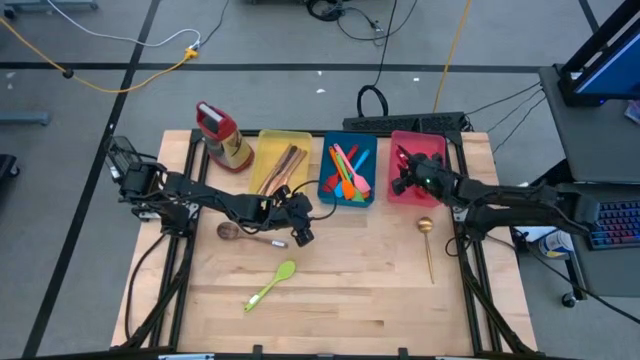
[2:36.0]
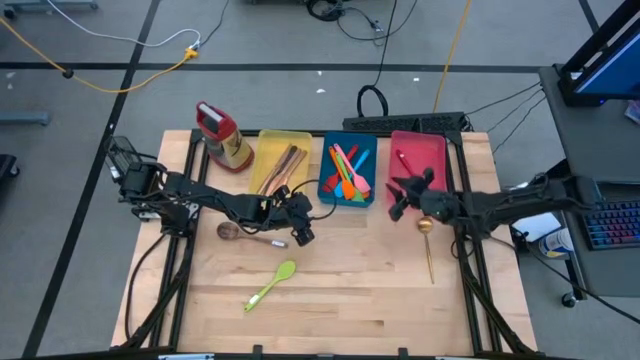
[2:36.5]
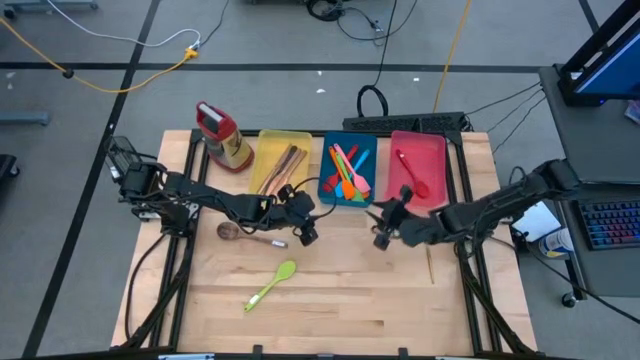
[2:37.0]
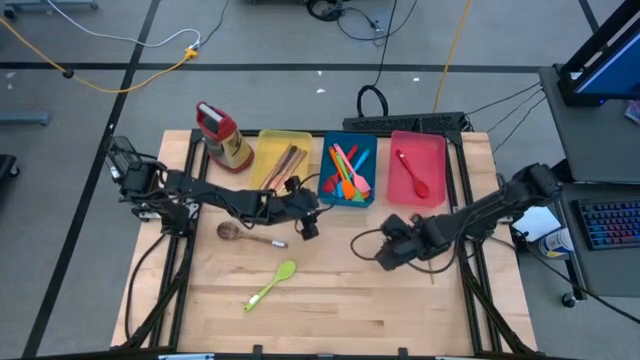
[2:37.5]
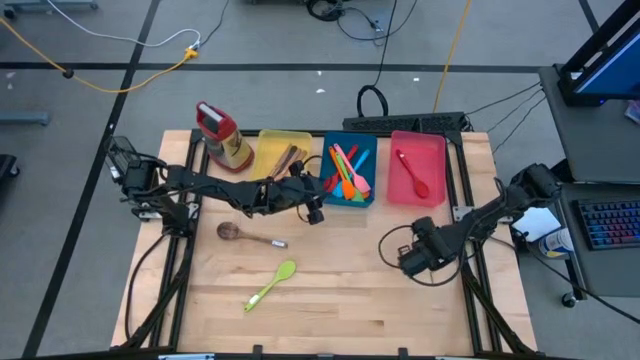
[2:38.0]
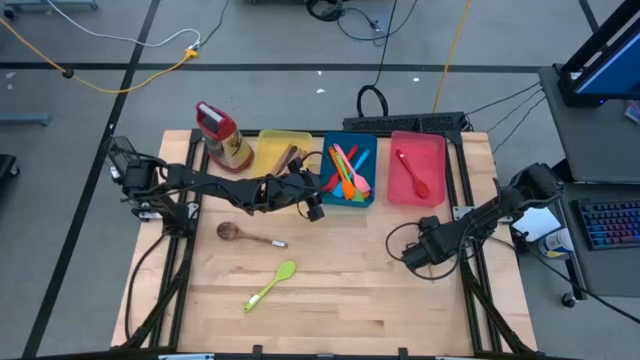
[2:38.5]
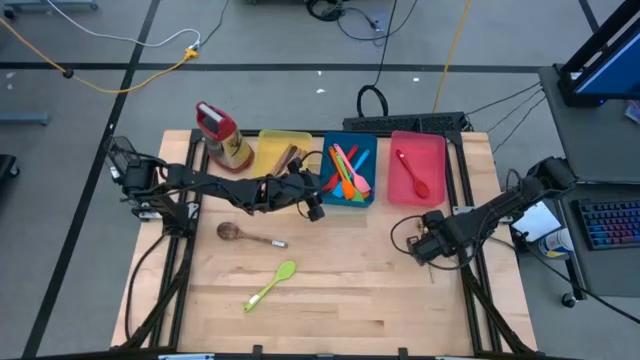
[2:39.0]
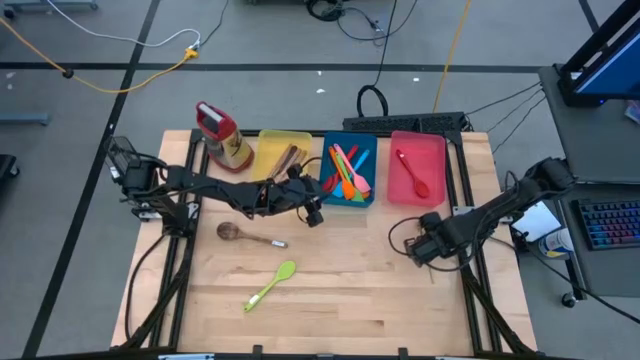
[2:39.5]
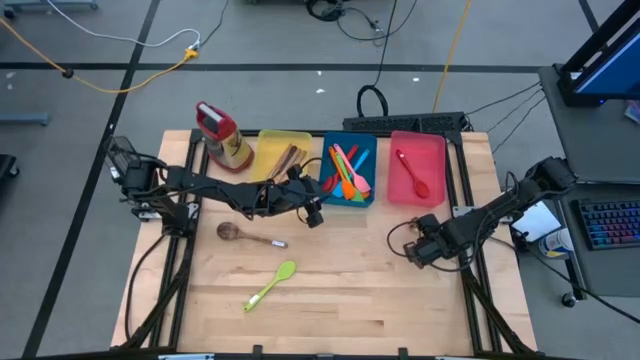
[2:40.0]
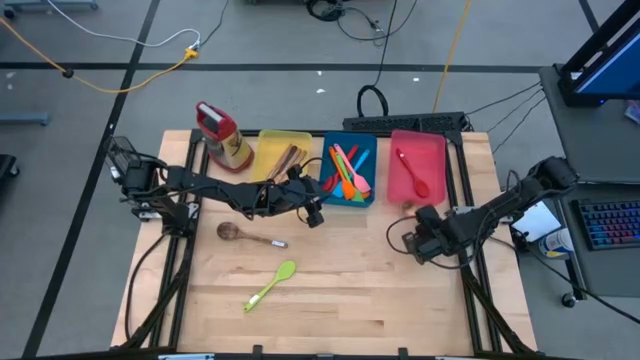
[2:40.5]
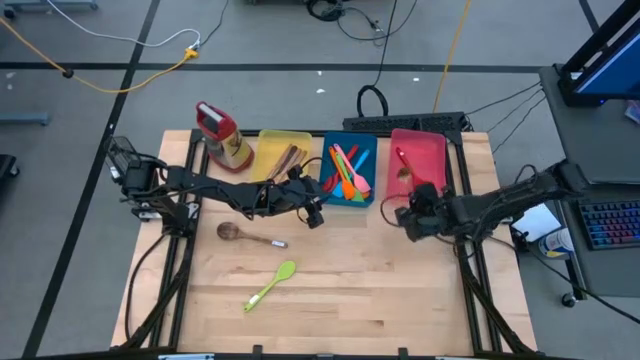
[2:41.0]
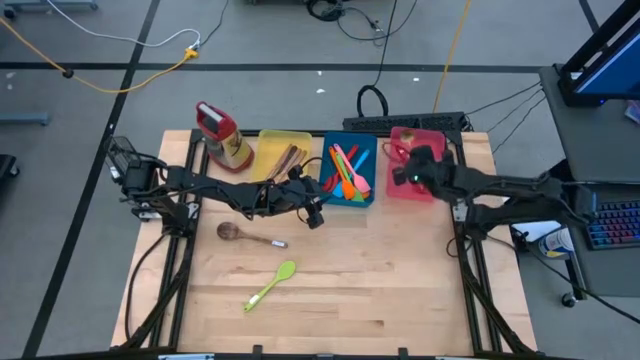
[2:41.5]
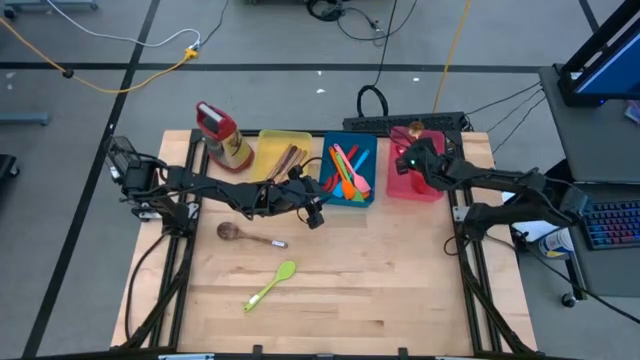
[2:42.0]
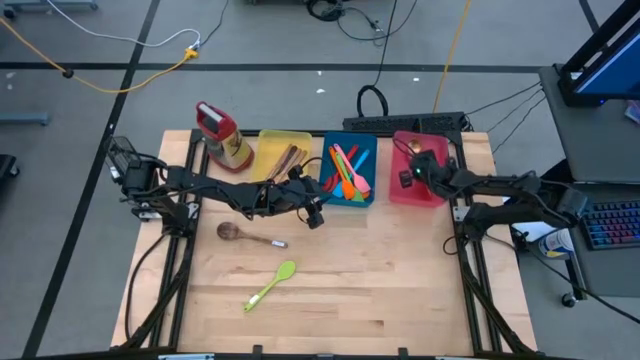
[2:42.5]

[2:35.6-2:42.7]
Task: Pick & Place Kitchen Items
Put the gold serving spoon into the pink bin

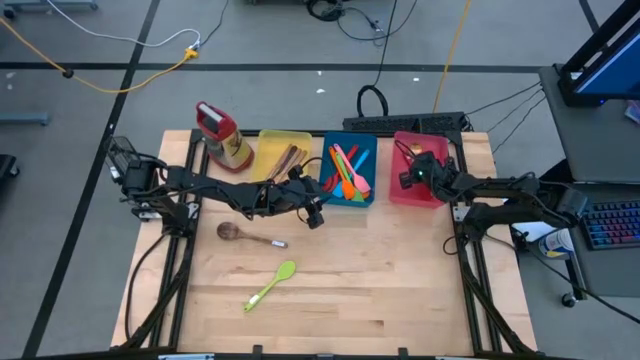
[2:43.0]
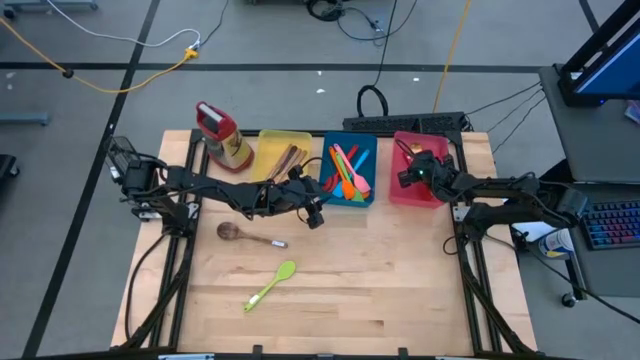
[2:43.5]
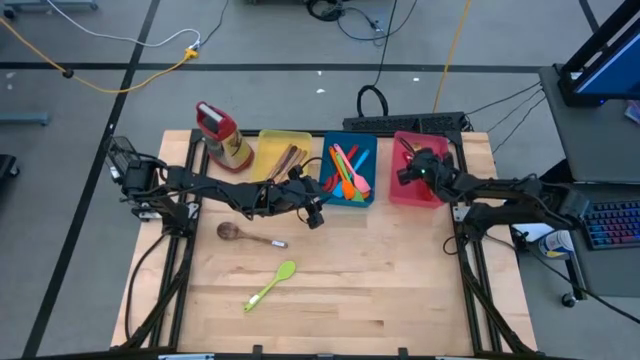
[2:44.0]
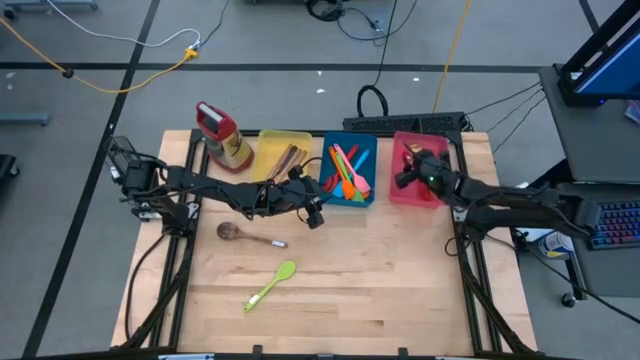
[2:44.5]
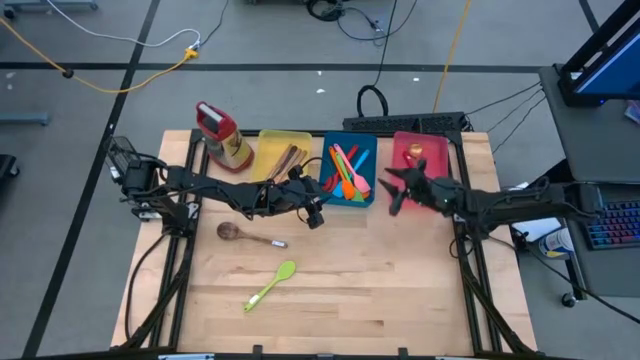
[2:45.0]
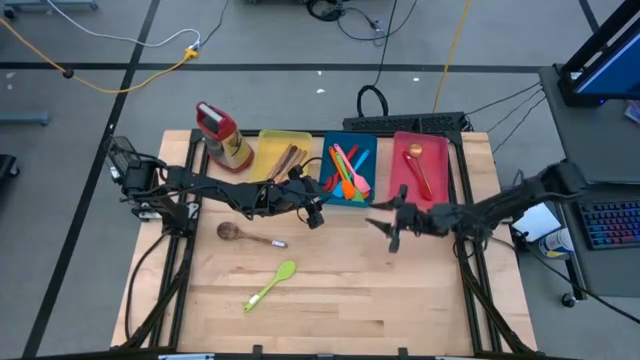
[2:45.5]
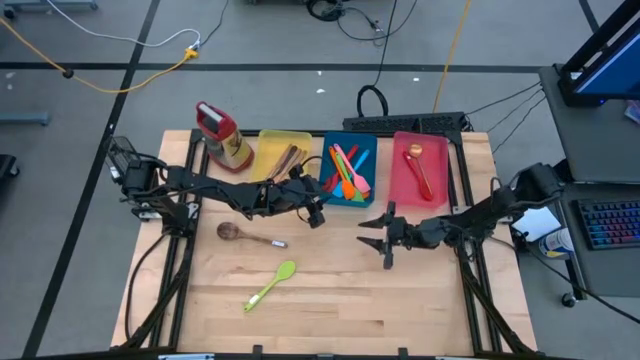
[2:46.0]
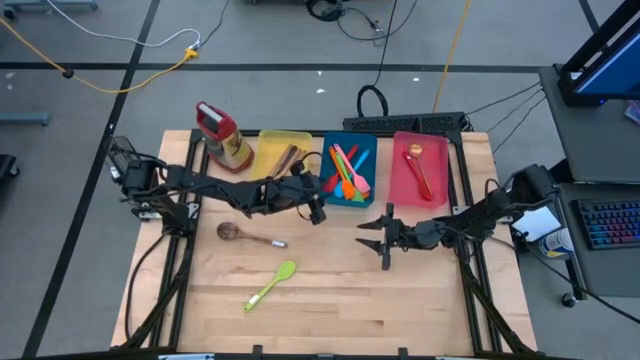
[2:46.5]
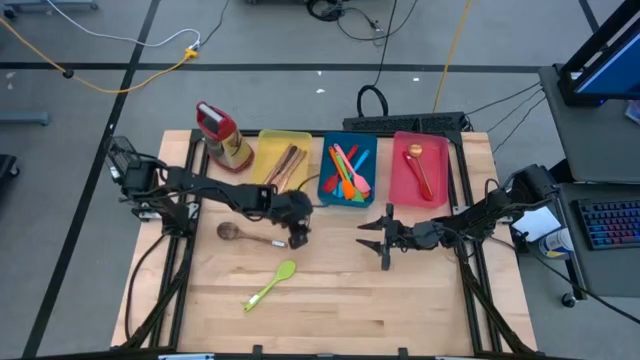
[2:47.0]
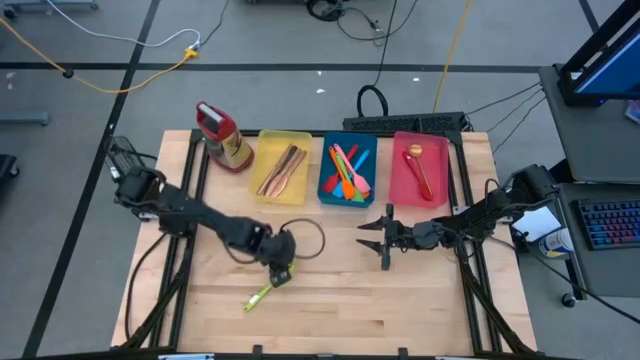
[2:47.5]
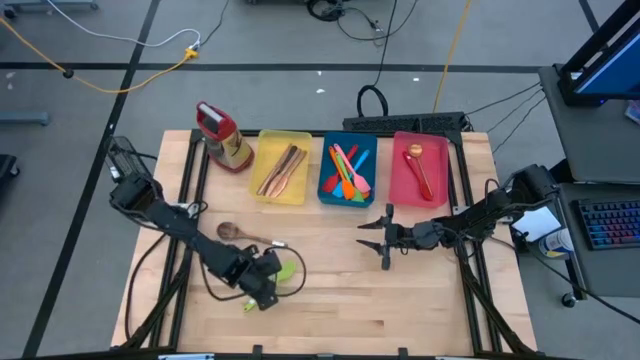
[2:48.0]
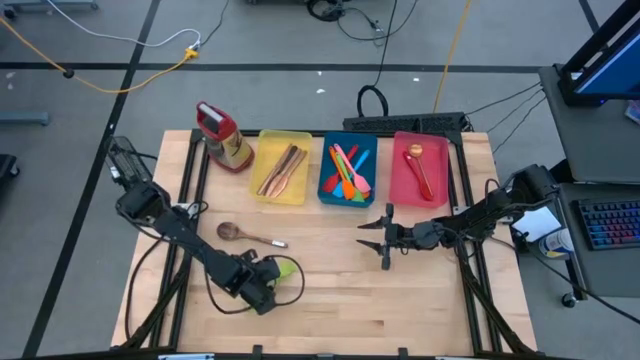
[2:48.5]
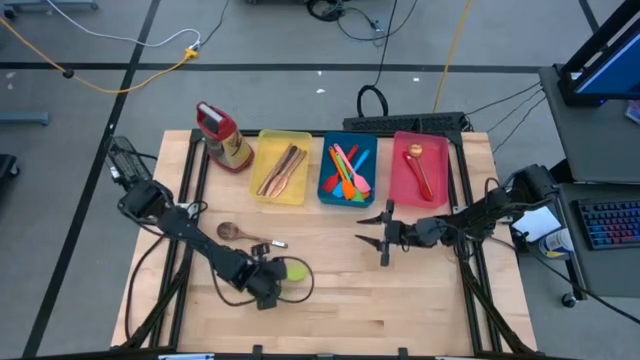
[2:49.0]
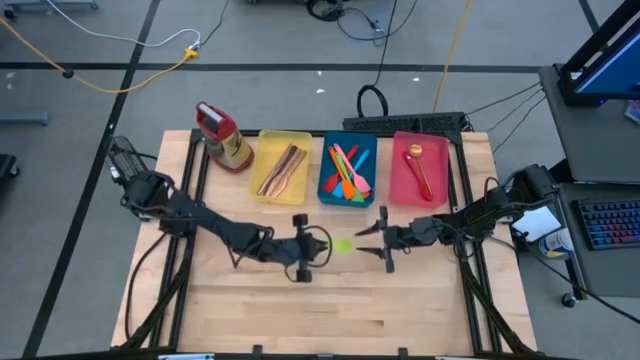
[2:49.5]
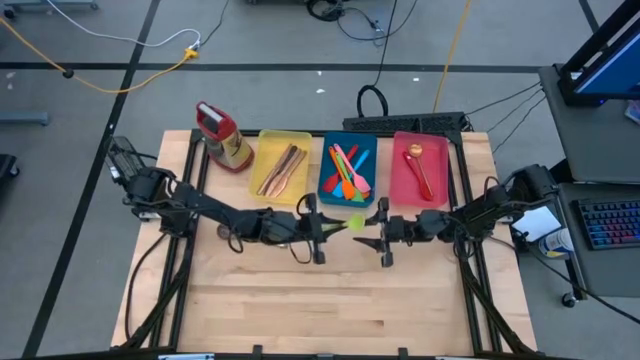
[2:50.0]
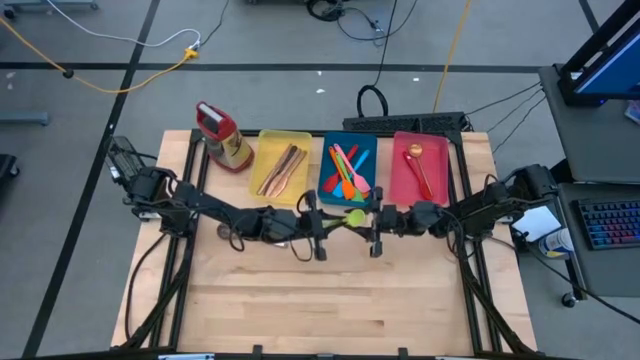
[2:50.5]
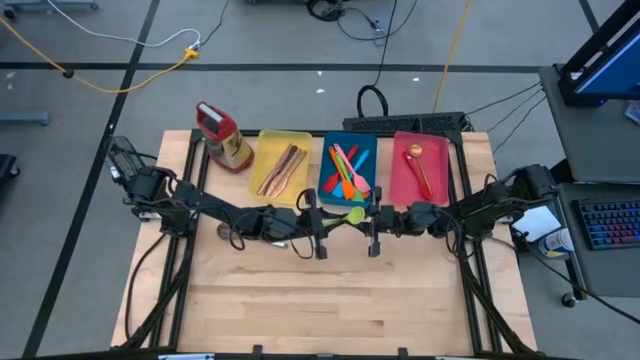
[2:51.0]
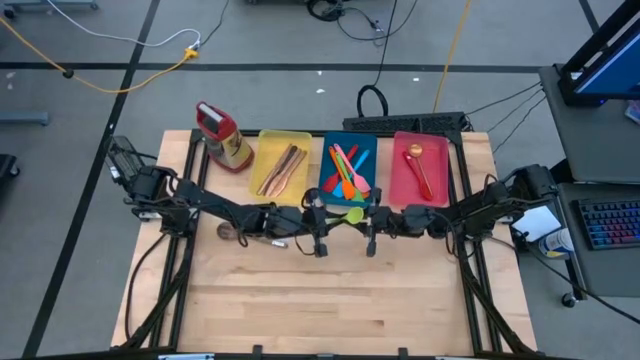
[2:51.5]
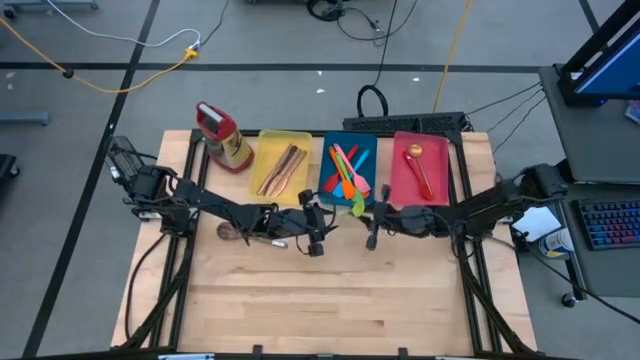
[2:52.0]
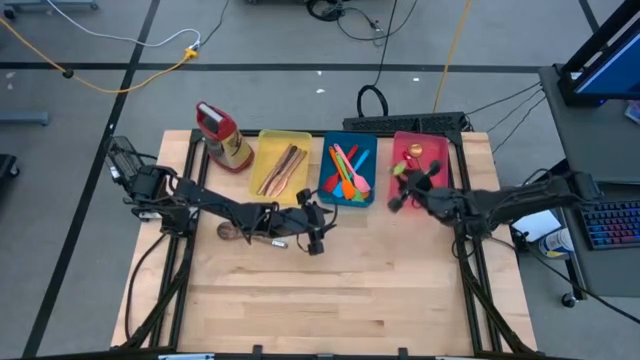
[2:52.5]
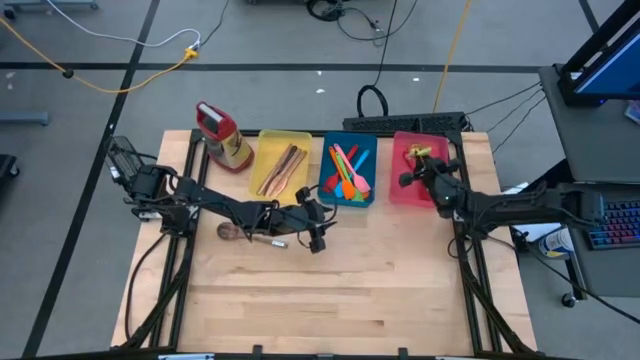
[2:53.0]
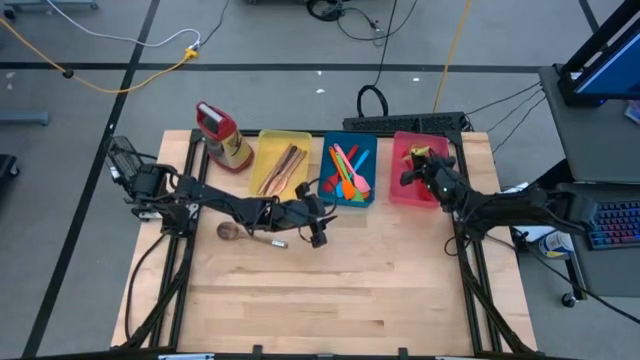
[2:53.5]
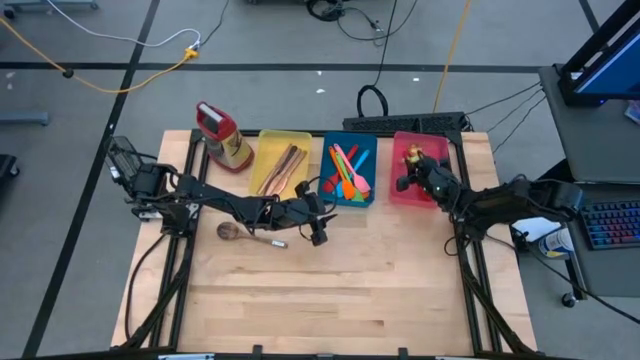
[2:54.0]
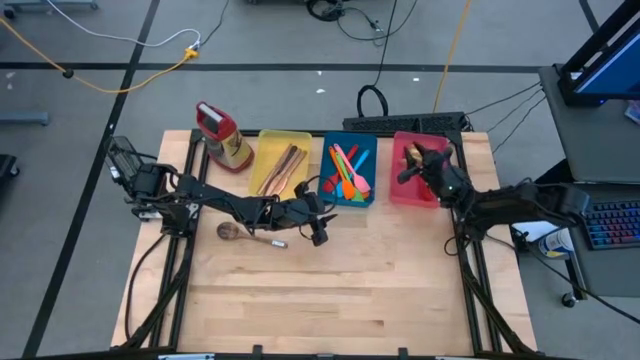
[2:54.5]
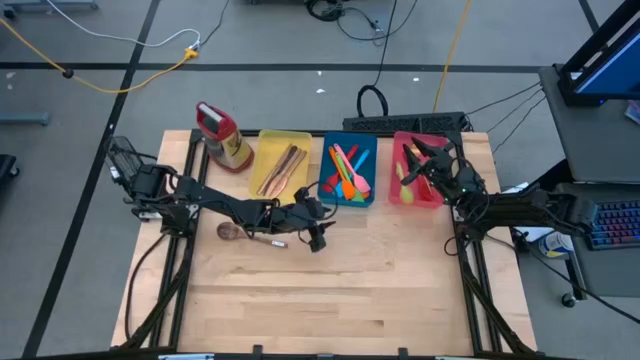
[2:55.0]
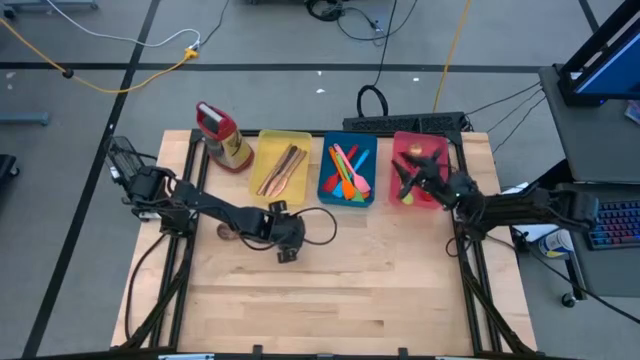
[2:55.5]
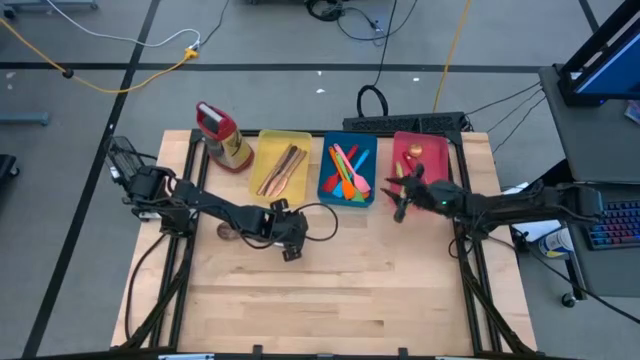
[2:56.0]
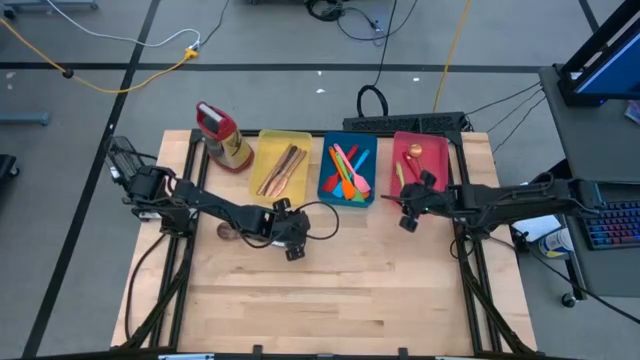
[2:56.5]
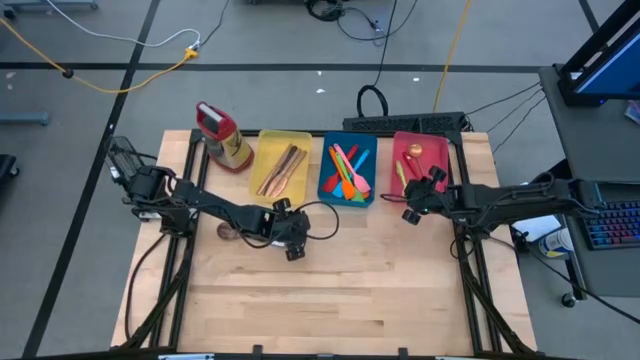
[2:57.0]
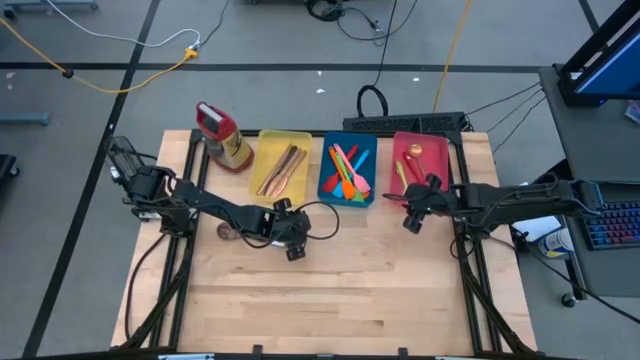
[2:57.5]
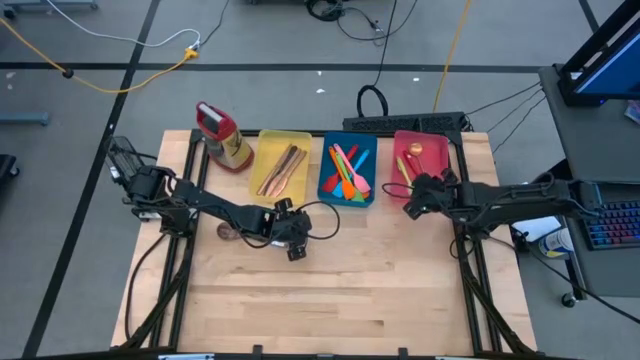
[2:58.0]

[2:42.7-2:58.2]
Put the green serving spoon into the pink bin
